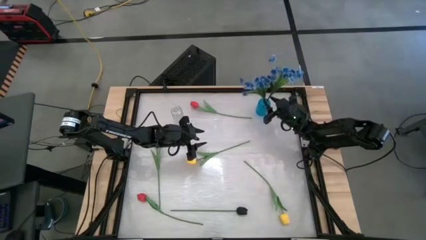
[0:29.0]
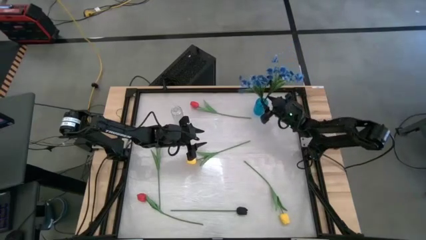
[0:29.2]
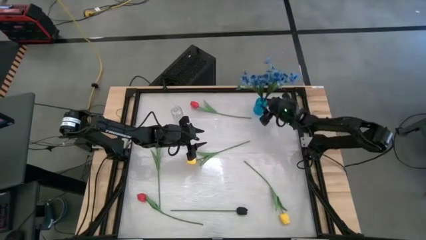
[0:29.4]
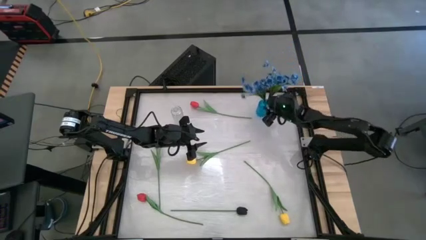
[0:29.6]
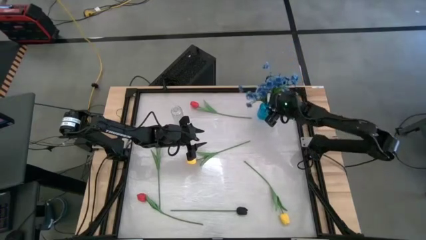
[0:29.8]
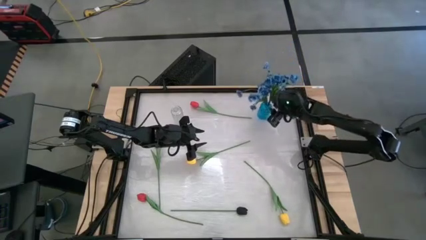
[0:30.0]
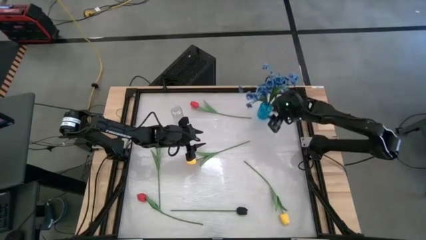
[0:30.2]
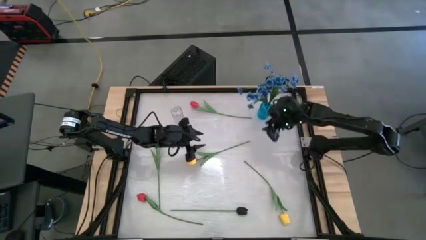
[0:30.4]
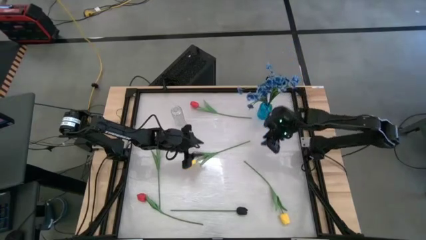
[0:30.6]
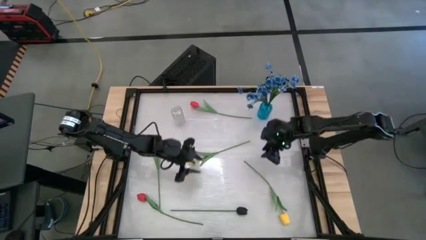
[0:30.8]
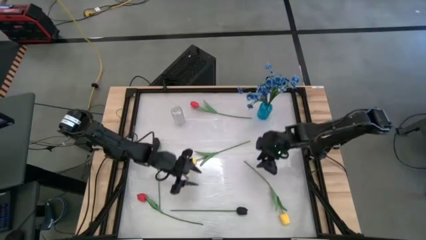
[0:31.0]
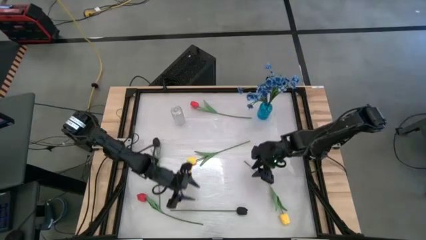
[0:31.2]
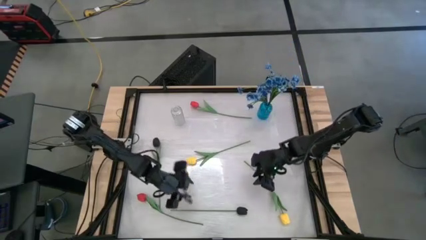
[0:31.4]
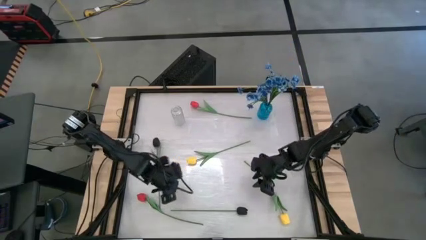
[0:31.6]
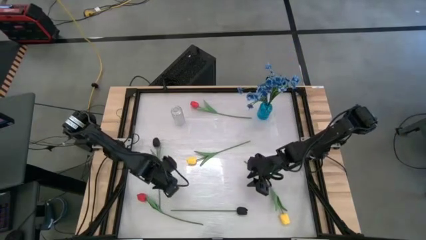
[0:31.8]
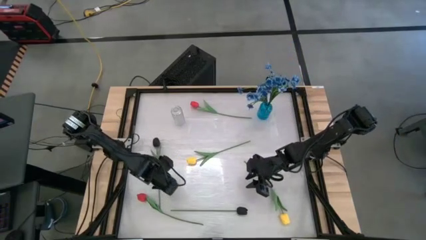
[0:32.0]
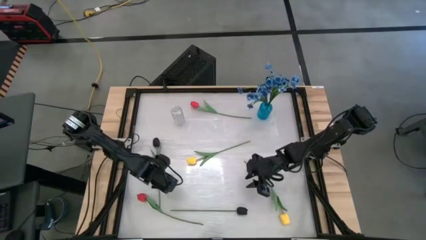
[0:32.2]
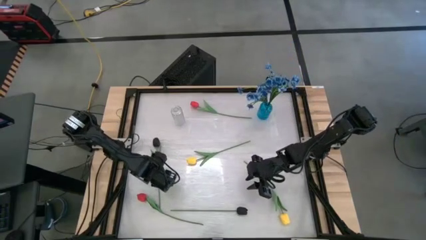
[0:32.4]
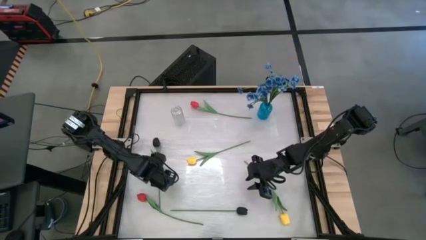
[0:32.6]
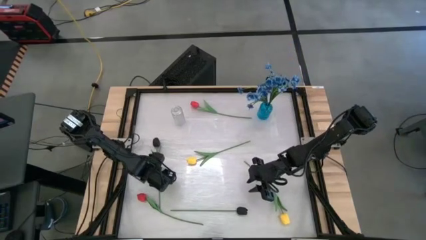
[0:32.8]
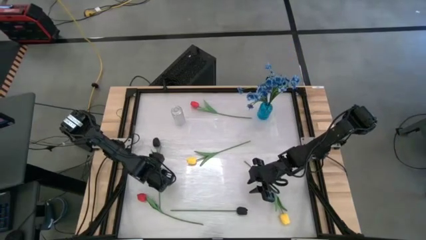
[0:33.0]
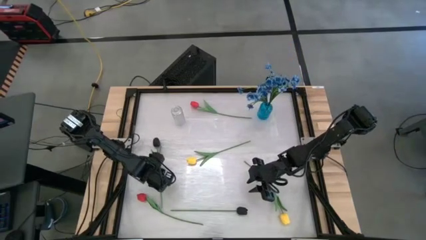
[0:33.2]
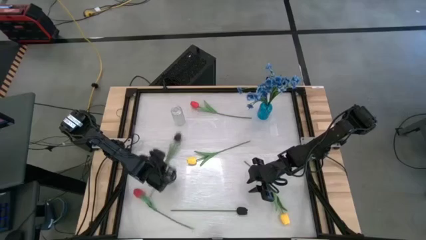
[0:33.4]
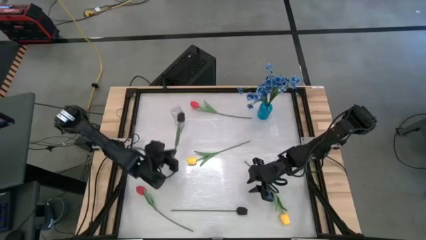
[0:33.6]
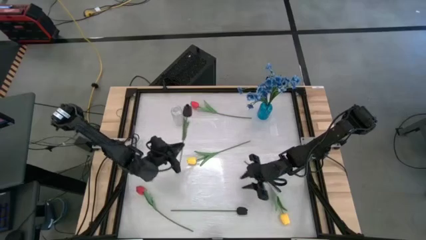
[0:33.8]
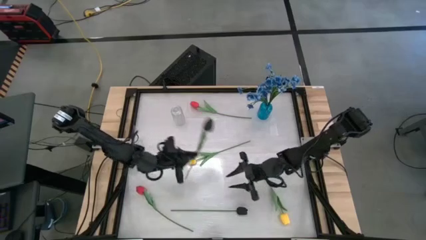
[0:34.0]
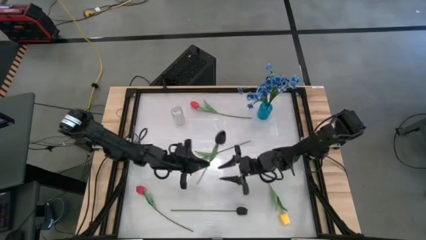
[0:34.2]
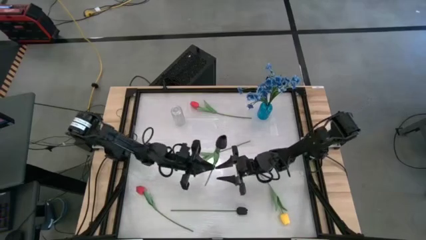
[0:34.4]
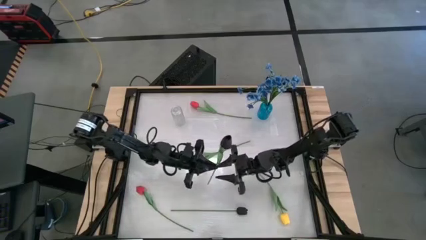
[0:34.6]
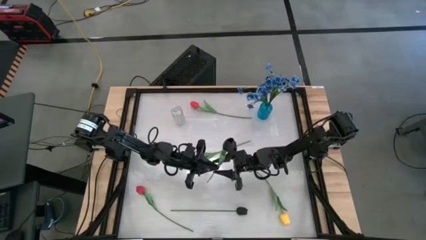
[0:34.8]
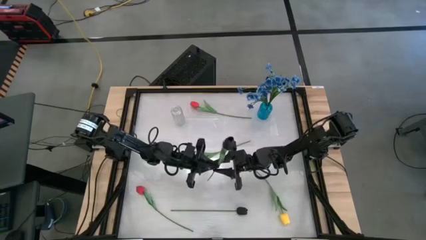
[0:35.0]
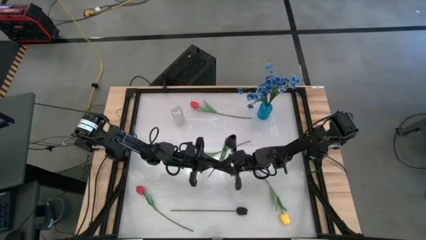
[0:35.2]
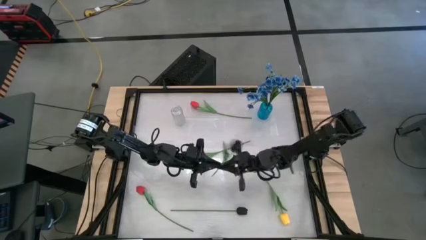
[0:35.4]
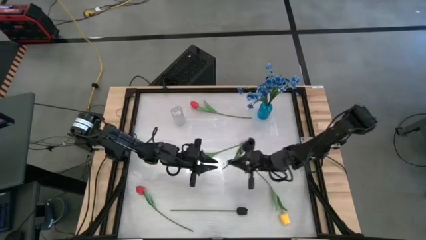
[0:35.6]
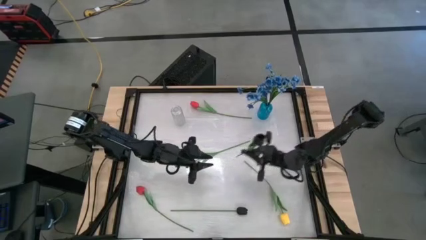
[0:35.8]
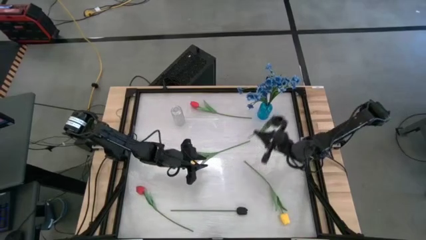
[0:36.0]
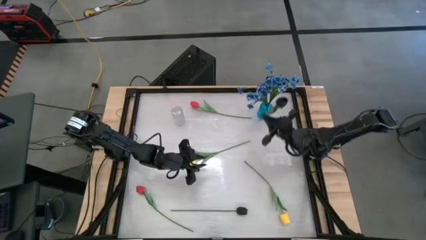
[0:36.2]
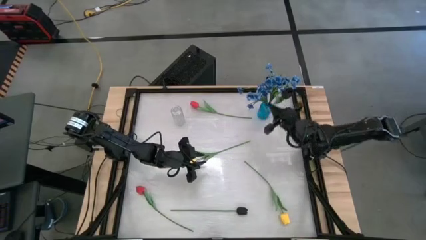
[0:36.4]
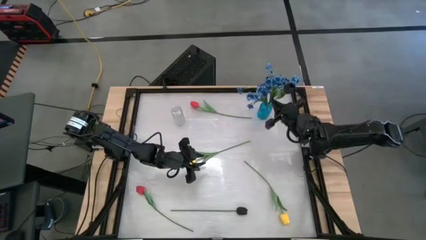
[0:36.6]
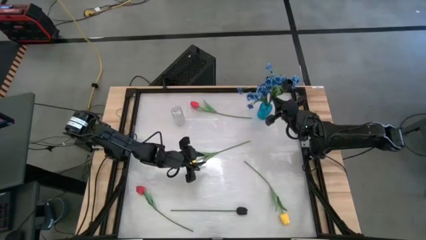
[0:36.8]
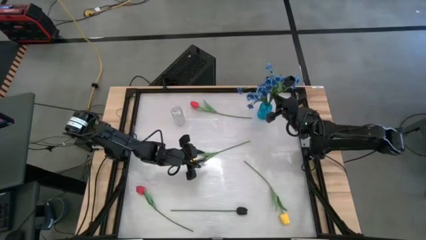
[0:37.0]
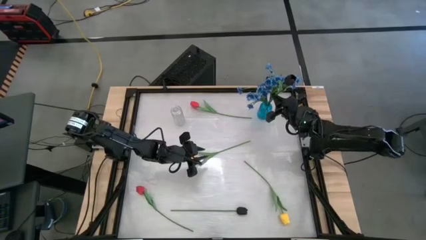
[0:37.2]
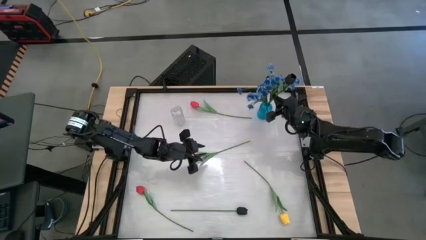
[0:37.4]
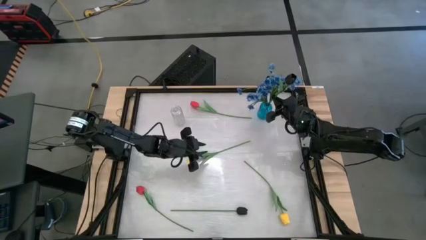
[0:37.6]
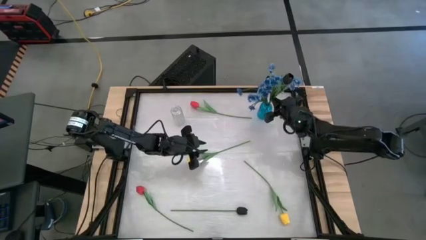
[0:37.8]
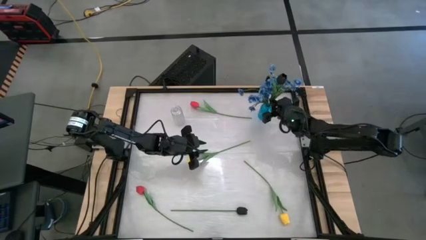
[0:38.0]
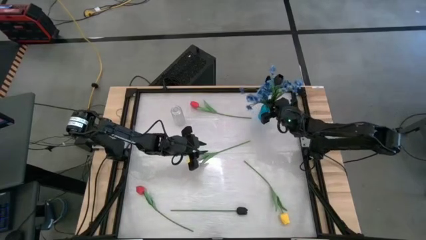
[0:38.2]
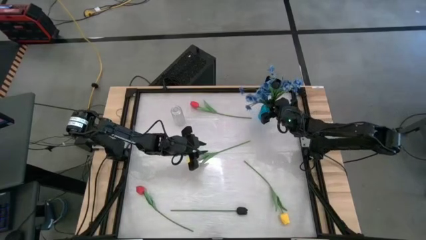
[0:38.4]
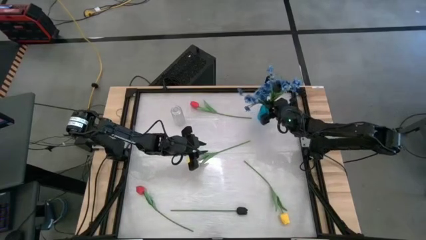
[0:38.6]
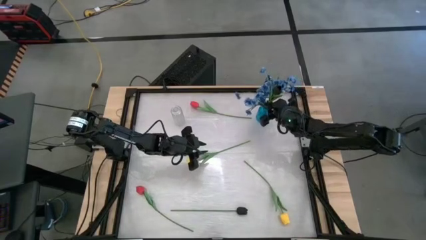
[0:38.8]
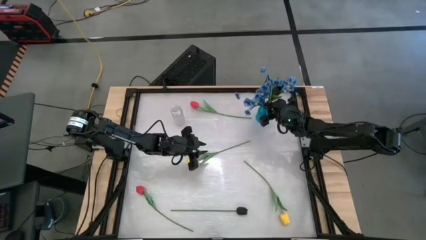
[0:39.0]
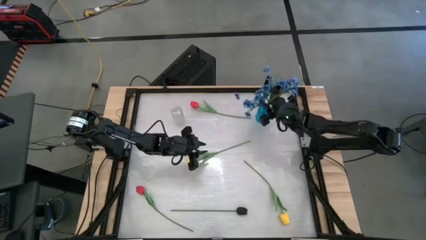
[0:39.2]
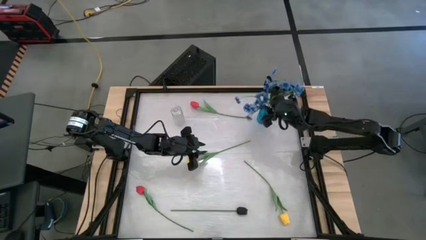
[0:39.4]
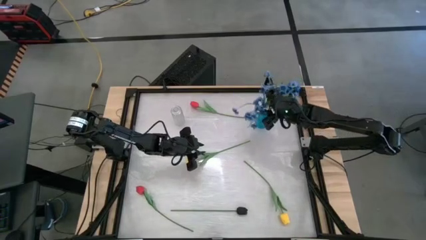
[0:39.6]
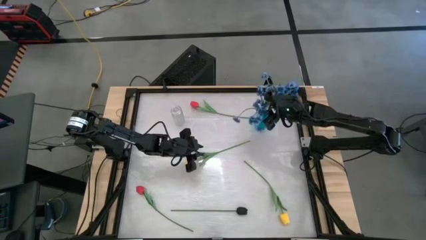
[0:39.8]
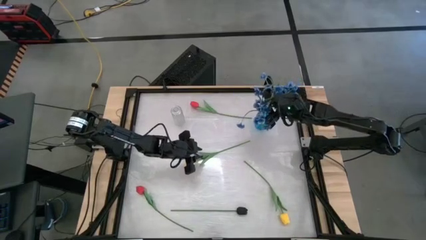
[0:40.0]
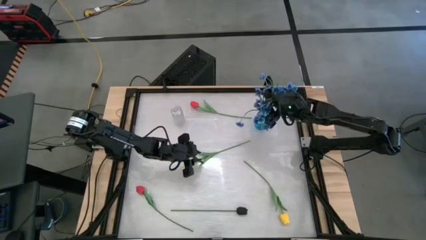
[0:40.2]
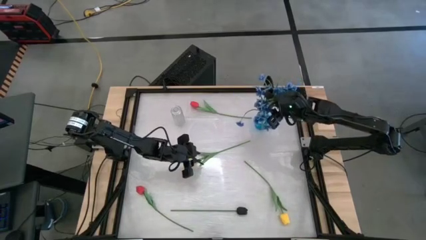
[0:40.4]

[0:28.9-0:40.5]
Task: Sort flowers into vase by color
Put the top black flower into the blue vase

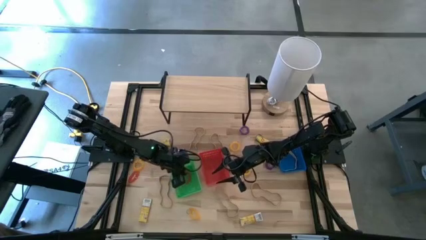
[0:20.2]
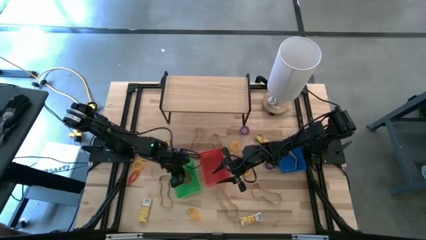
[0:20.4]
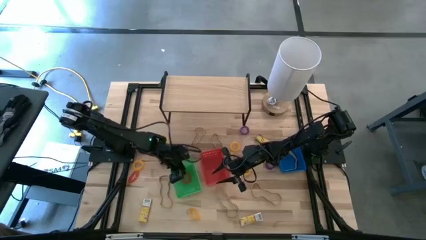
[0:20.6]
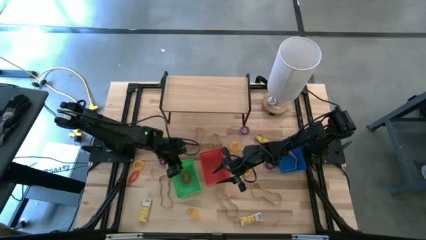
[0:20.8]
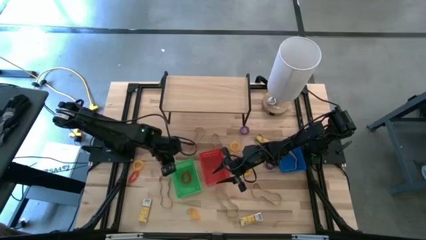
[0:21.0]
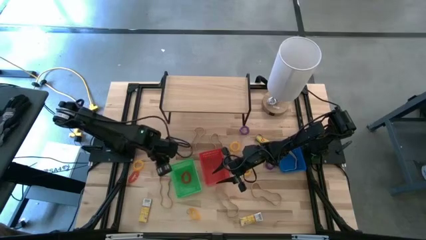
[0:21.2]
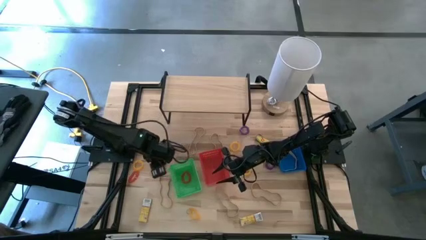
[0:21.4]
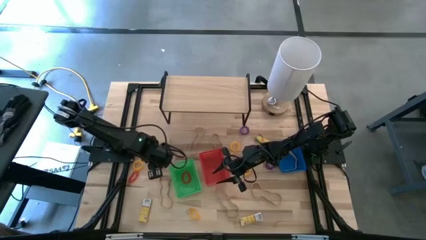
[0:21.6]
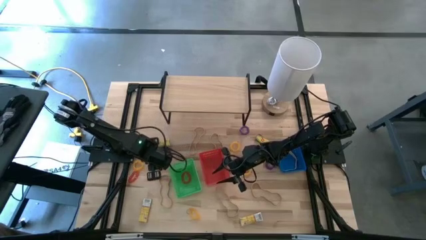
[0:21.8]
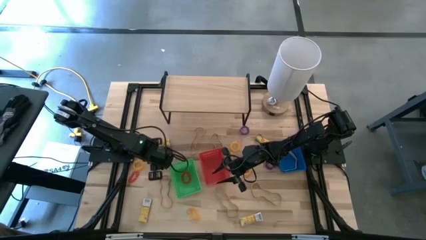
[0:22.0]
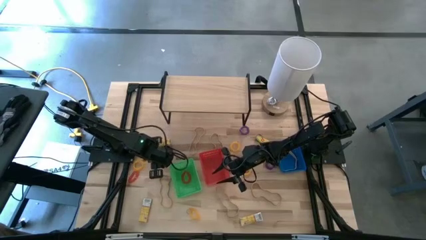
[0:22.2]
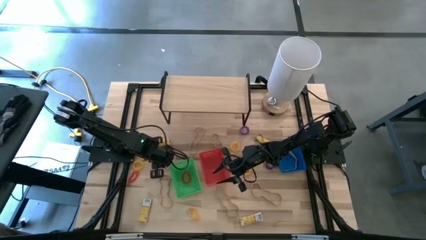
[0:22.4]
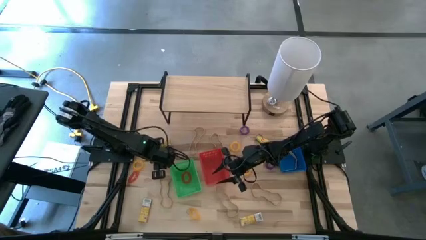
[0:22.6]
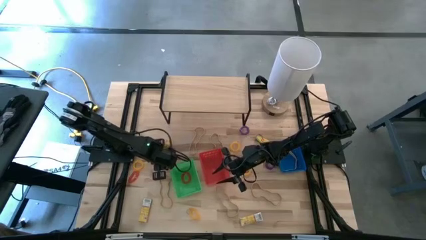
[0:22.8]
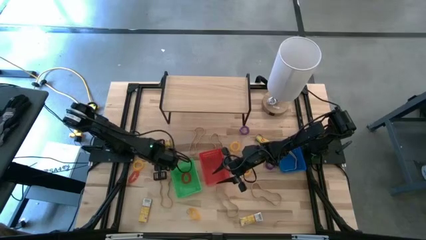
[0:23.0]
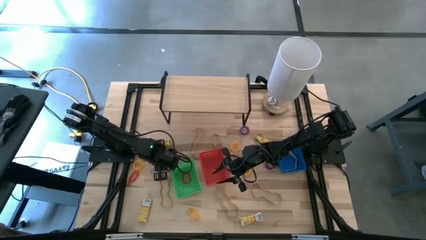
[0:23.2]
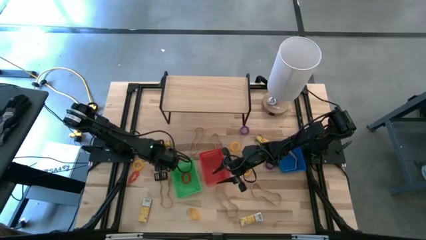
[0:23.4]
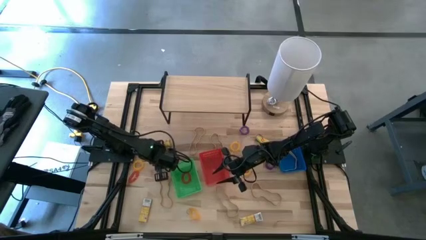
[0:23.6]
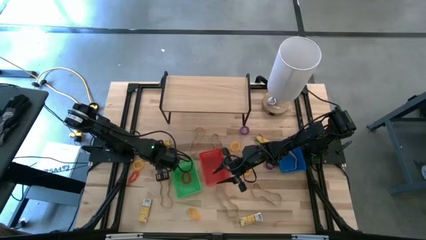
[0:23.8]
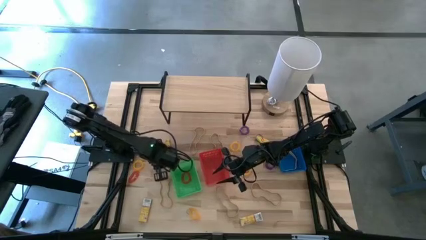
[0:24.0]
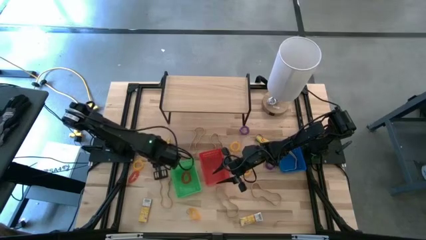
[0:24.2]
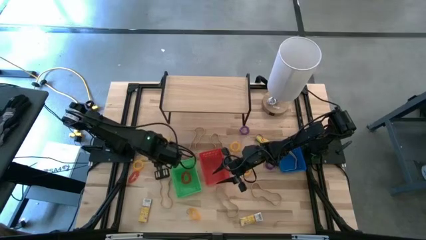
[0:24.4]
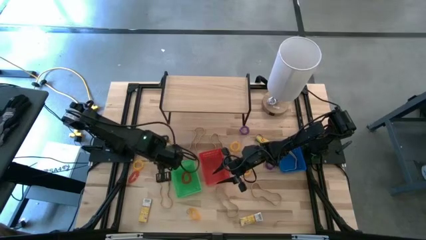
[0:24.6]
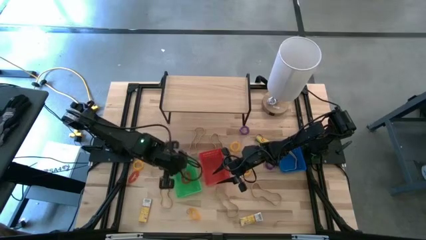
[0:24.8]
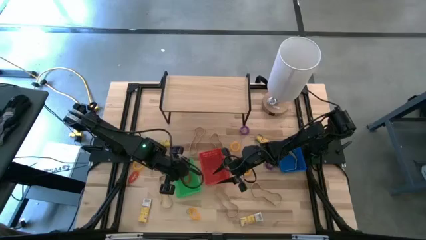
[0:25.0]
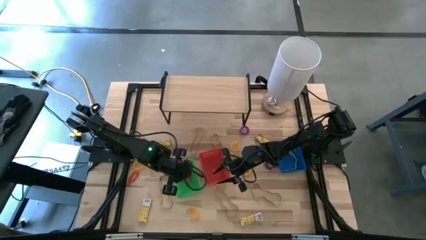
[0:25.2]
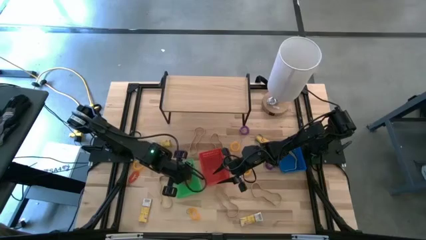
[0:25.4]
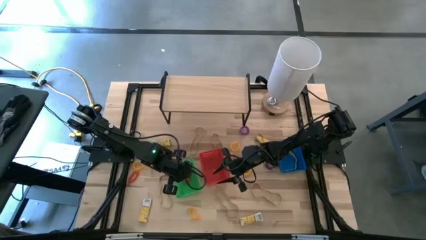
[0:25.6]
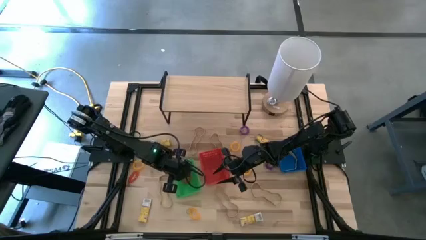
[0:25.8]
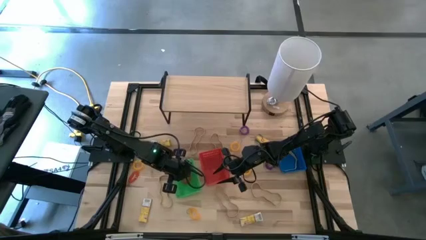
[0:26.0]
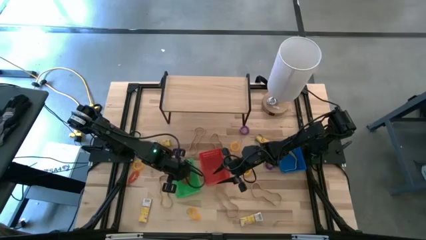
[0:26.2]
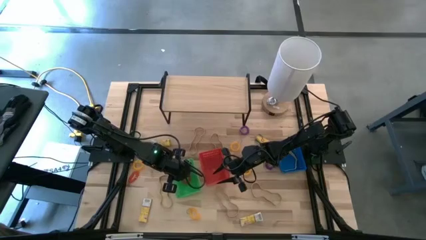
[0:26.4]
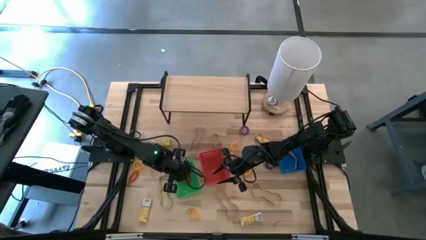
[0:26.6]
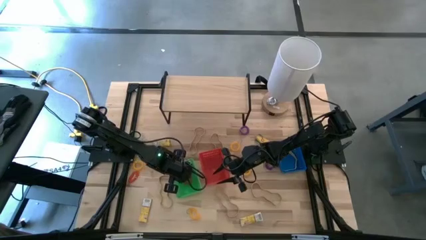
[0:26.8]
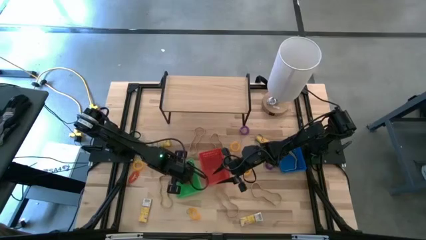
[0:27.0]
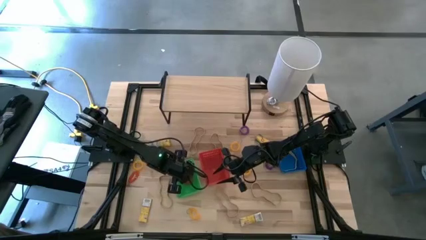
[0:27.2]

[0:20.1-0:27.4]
Task: Pick & Place Office Desk Supplies
Put the violet spring keychain into the green bin
